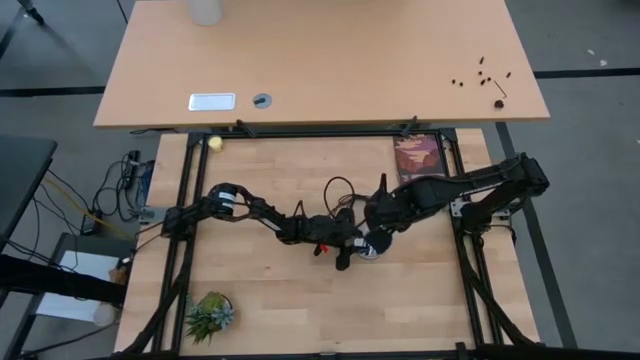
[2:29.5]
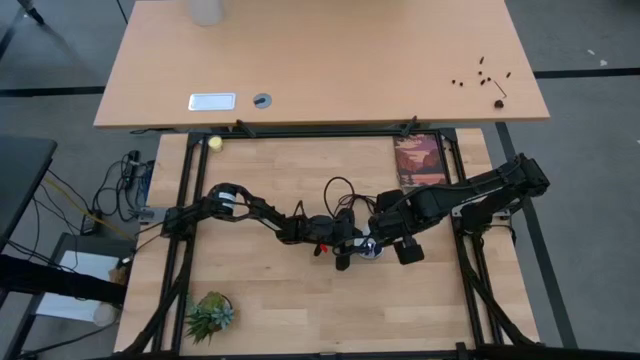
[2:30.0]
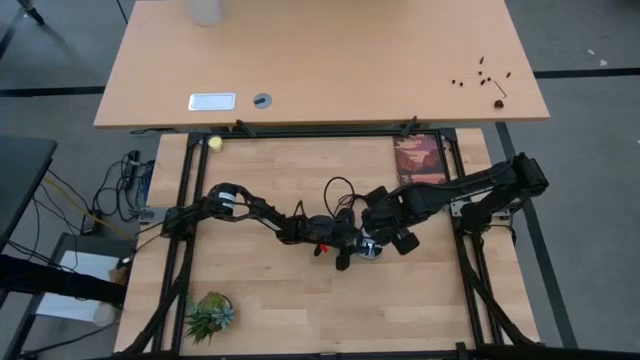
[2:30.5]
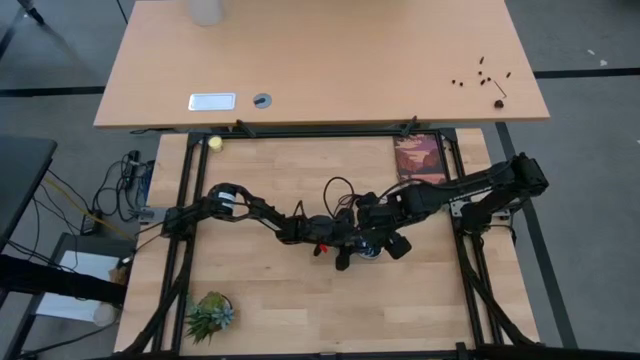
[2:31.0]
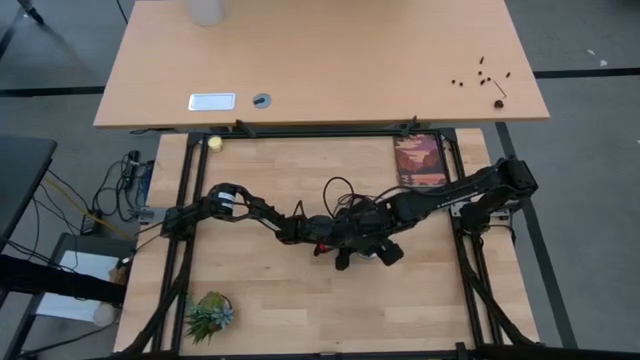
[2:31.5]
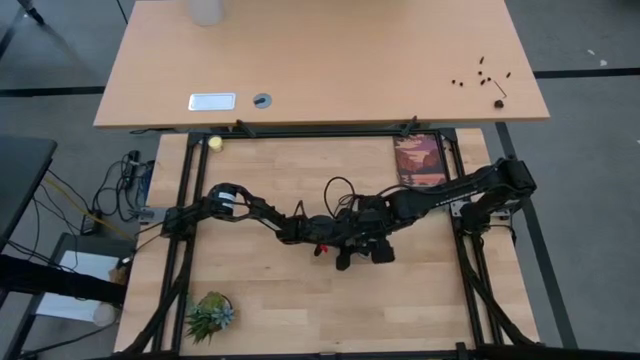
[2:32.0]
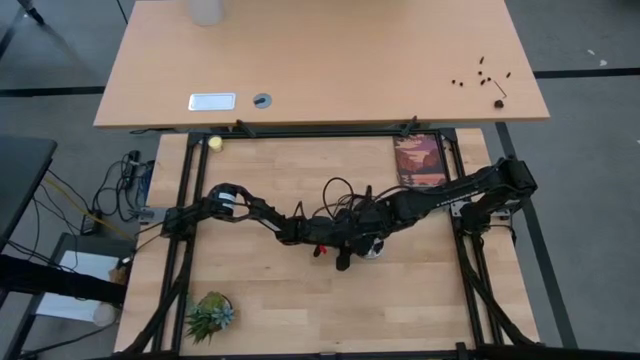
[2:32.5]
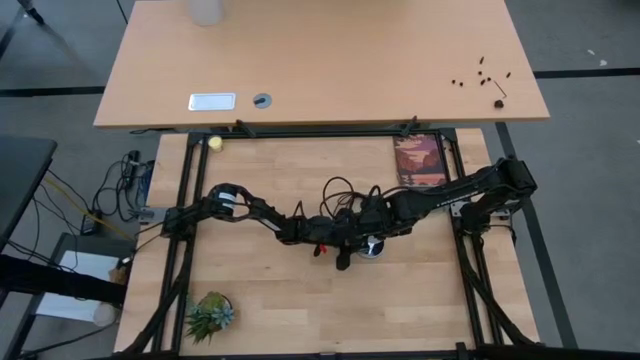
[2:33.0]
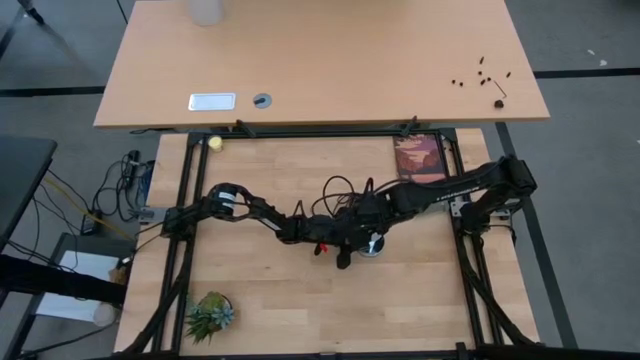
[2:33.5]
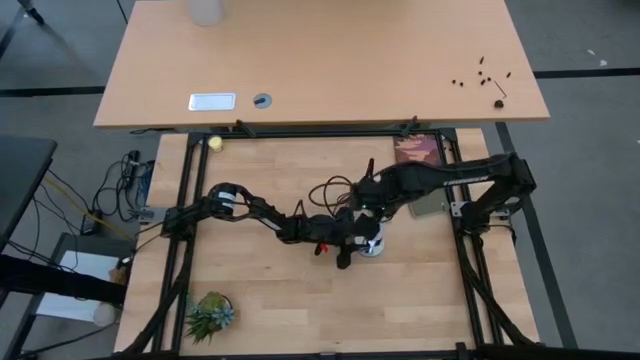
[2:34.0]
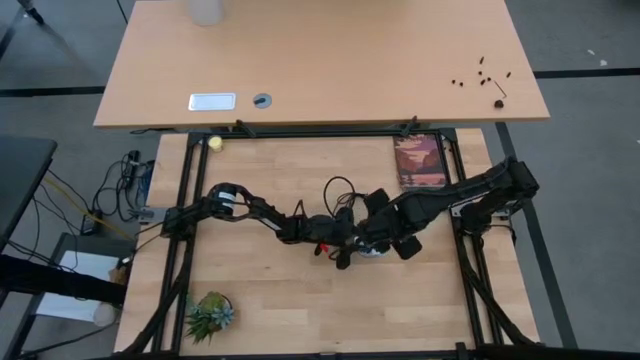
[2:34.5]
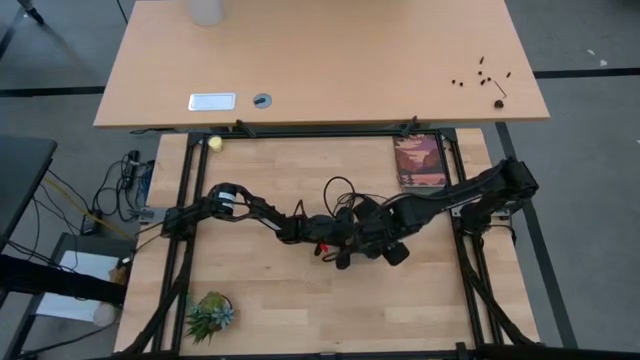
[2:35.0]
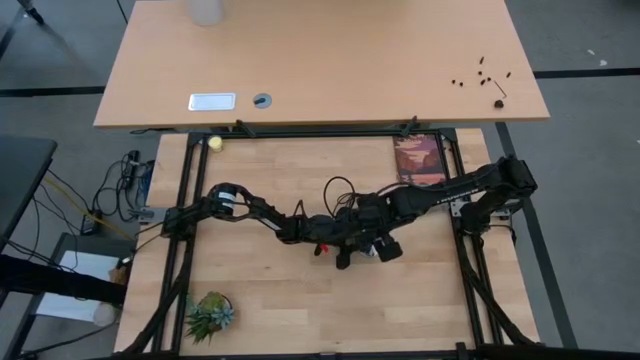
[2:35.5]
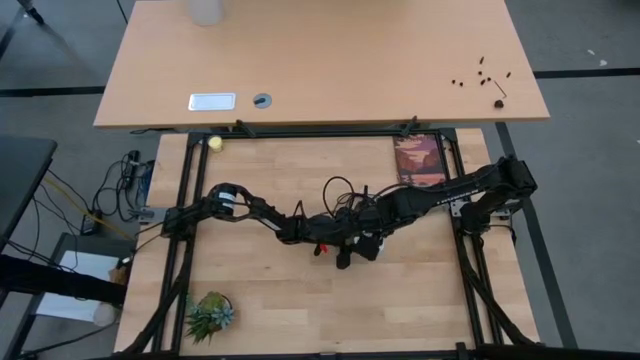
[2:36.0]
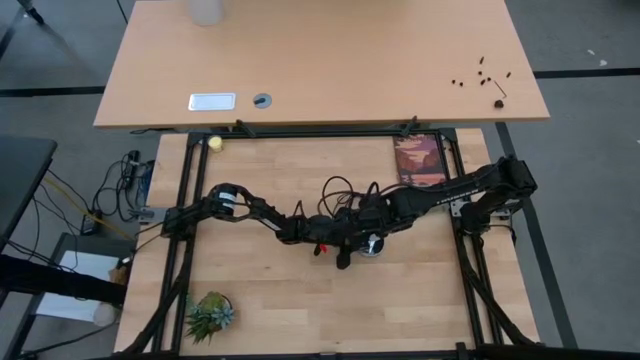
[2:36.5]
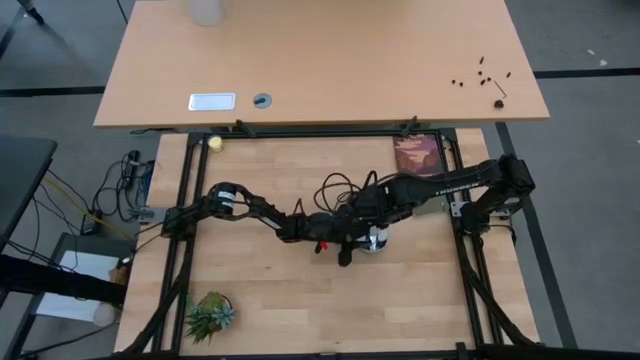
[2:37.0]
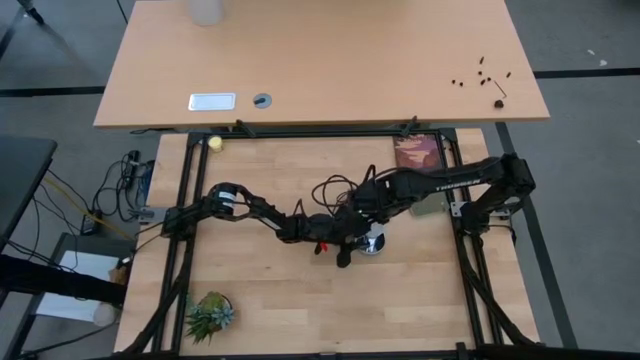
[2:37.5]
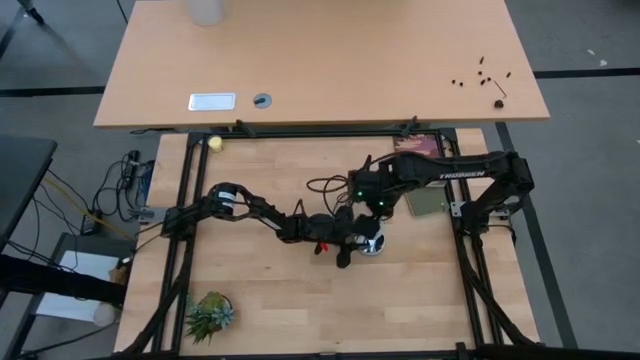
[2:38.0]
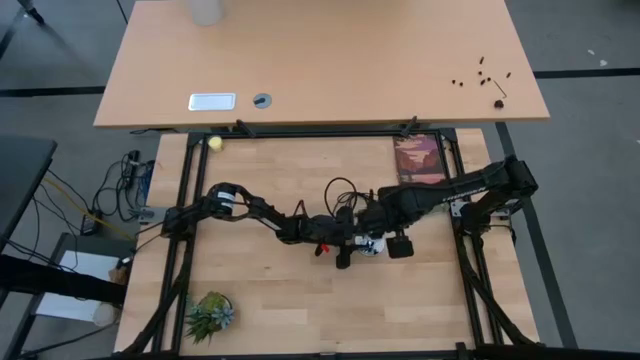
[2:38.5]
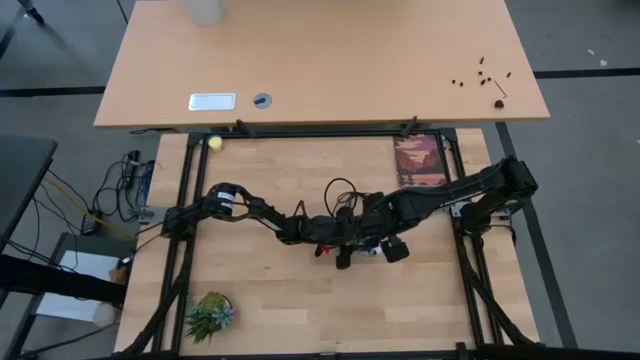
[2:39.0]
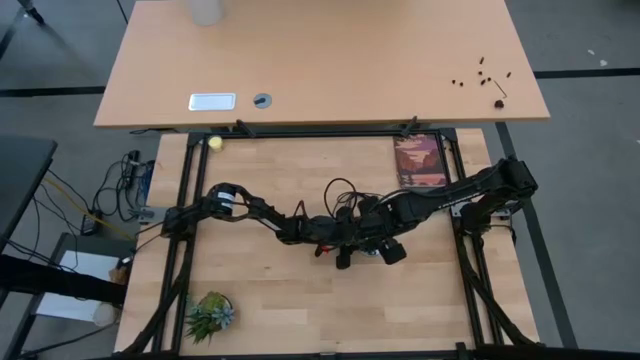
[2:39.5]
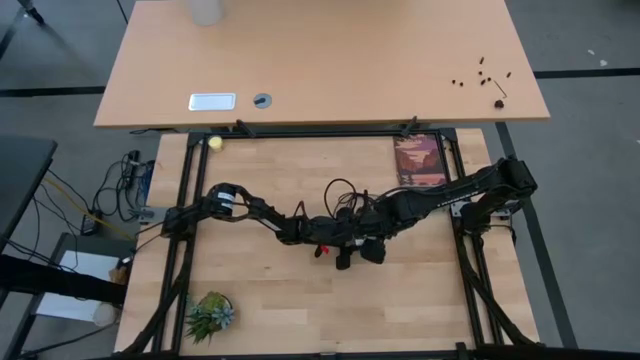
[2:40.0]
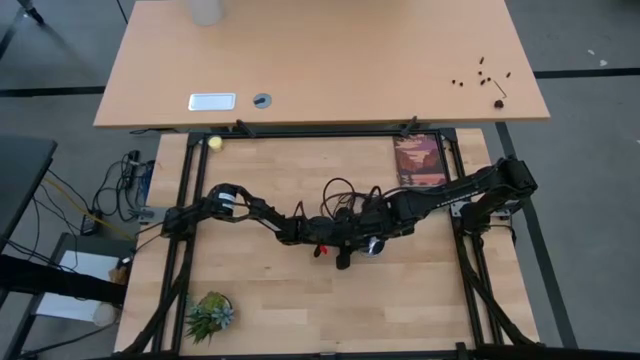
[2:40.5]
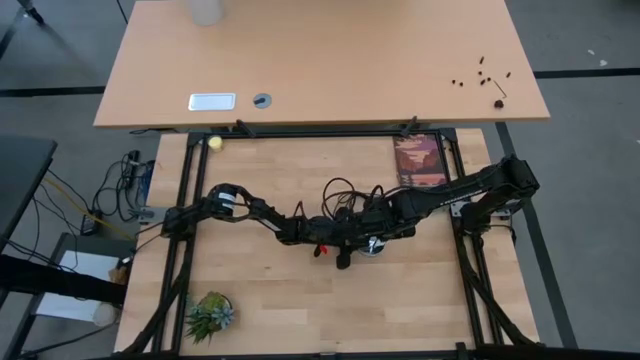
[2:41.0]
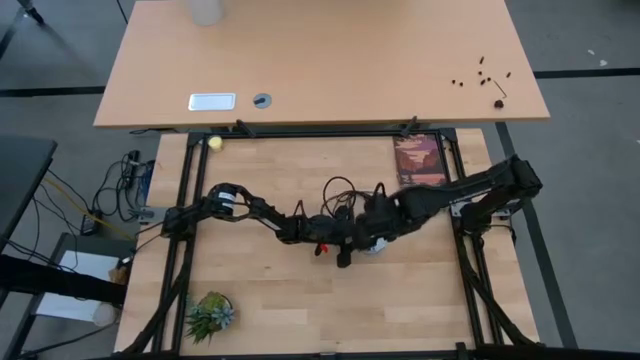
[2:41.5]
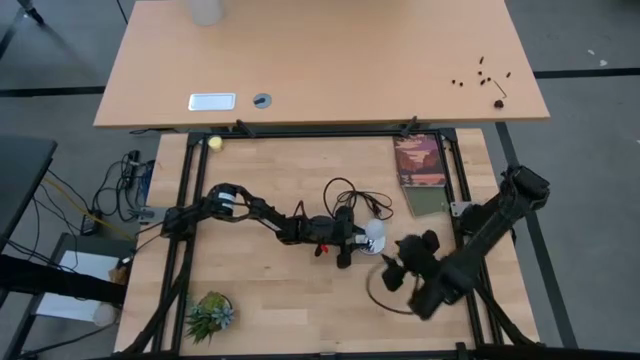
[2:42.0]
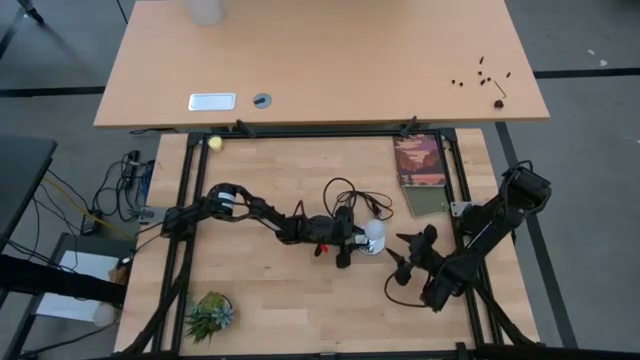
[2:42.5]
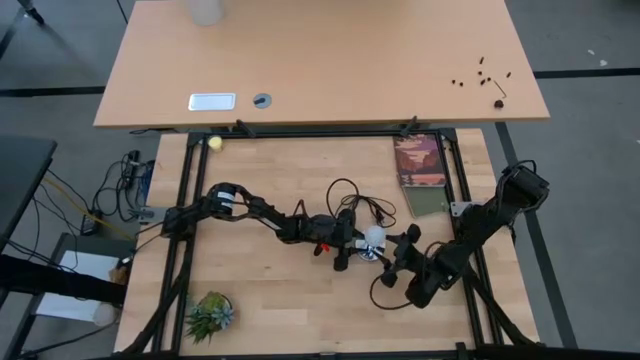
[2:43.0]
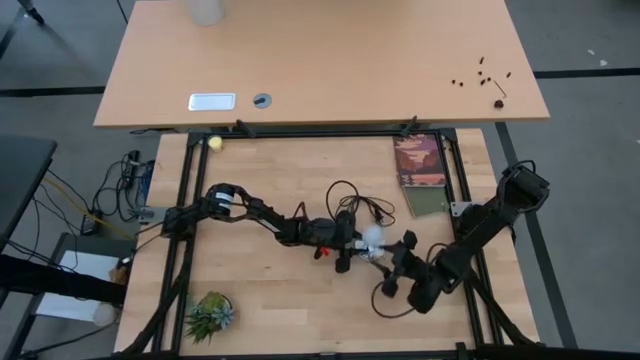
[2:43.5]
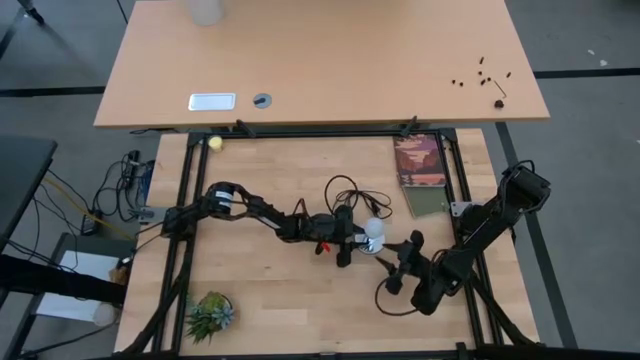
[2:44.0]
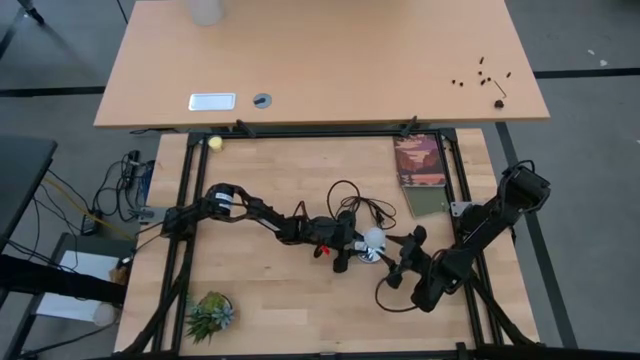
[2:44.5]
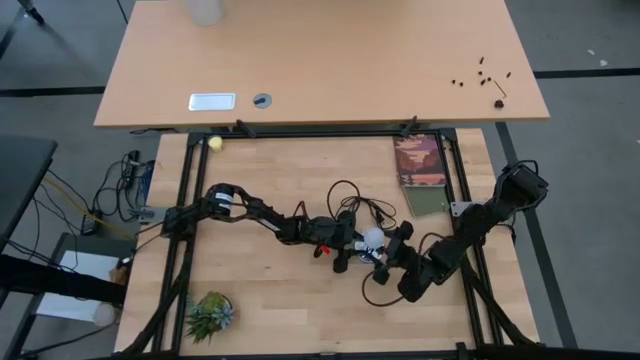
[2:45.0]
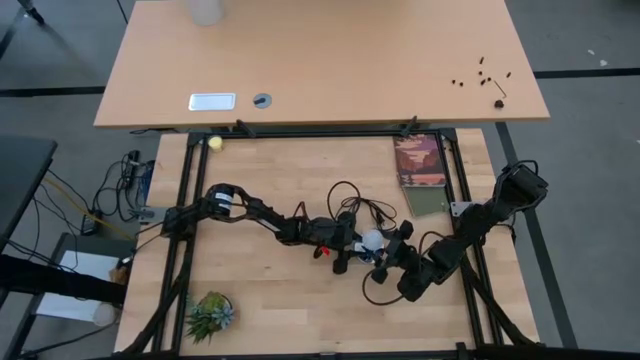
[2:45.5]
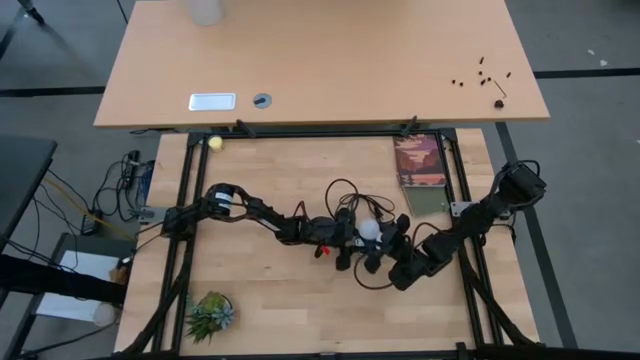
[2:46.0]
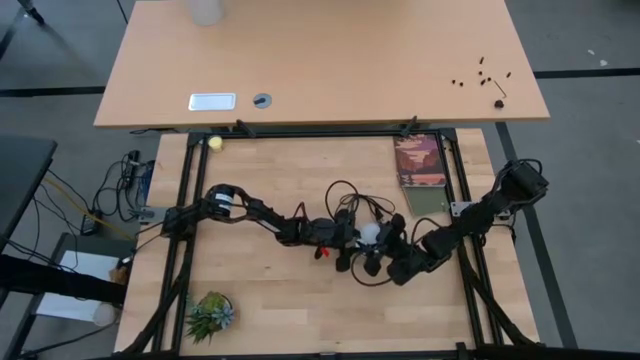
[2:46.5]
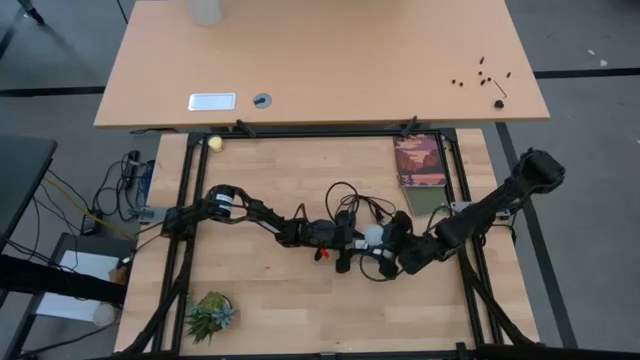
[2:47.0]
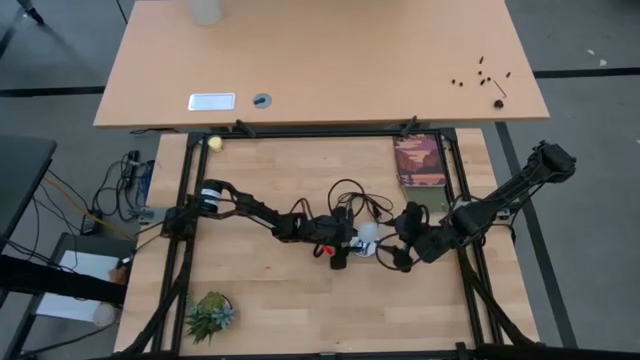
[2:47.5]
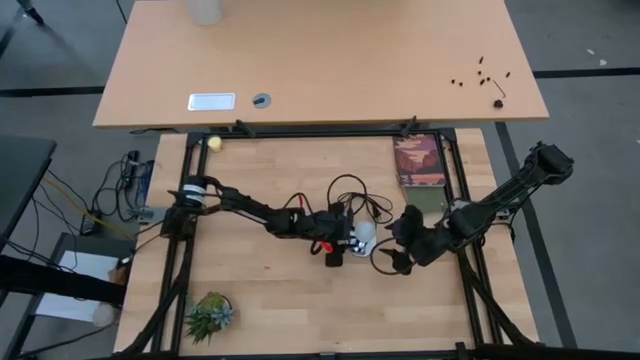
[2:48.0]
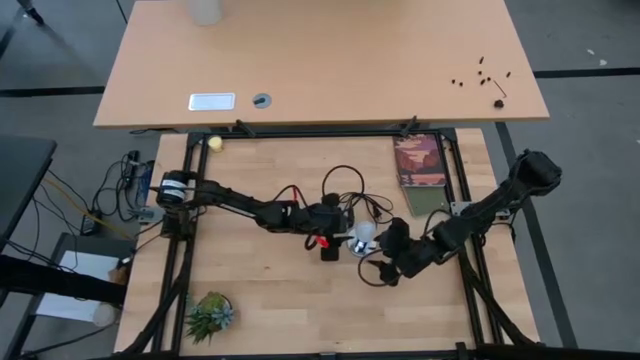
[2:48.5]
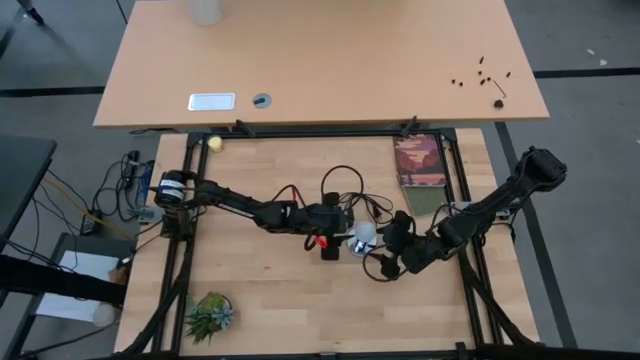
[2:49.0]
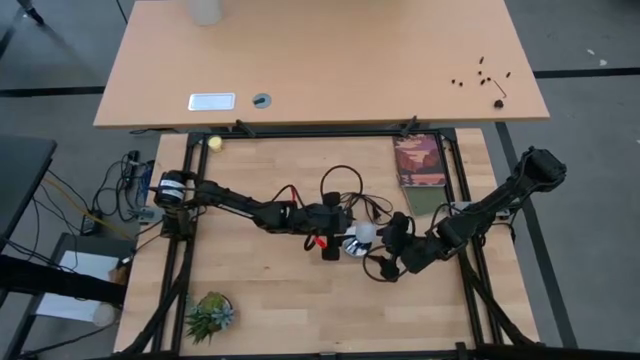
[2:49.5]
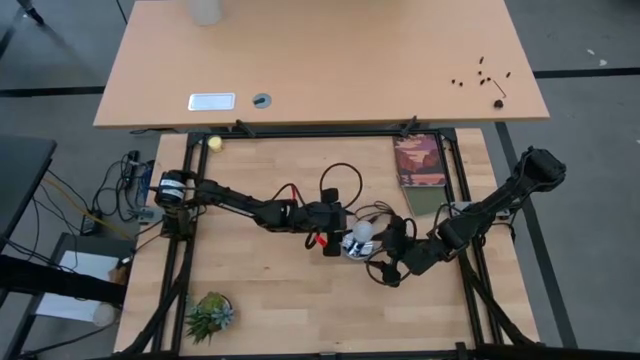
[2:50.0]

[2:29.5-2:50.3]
Task: Screw lightbulb
Insert the lightbulb into the silver lamp

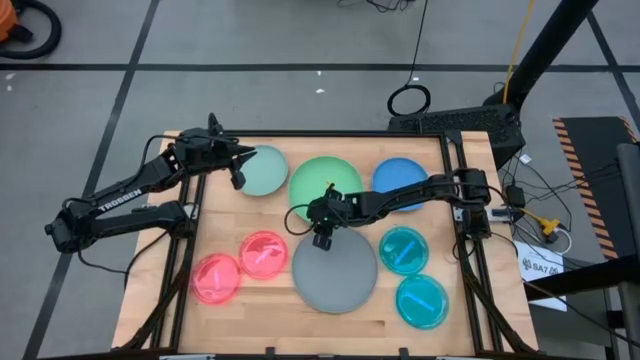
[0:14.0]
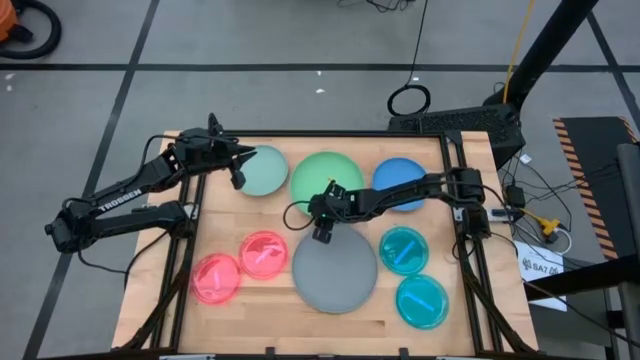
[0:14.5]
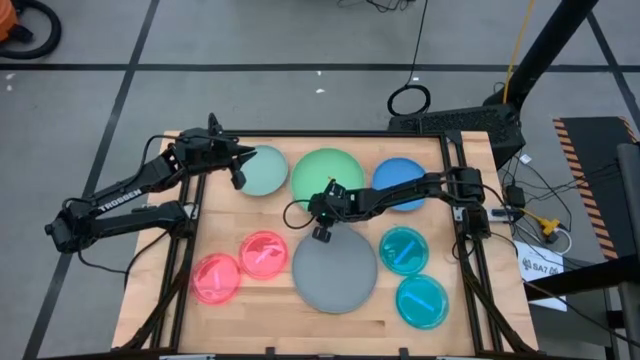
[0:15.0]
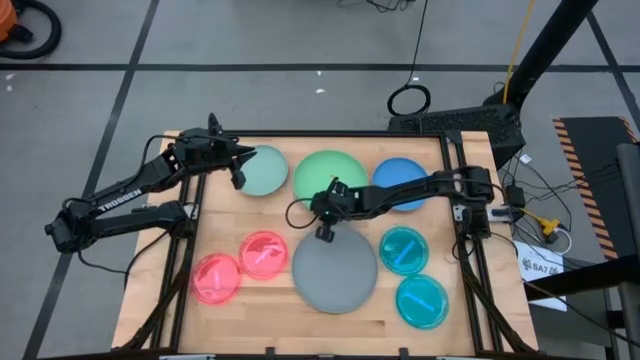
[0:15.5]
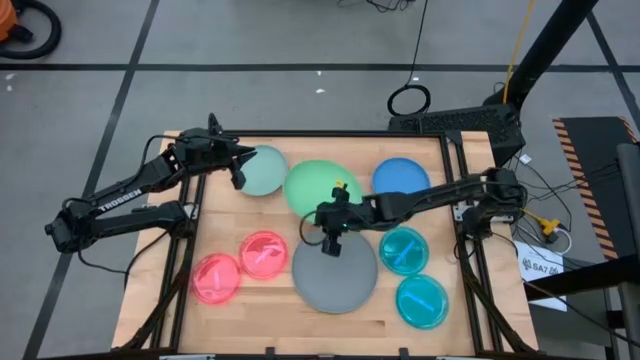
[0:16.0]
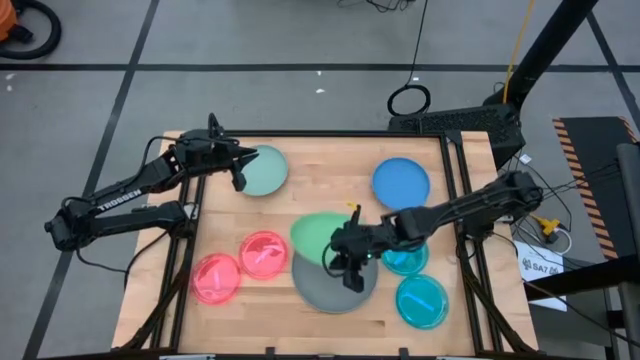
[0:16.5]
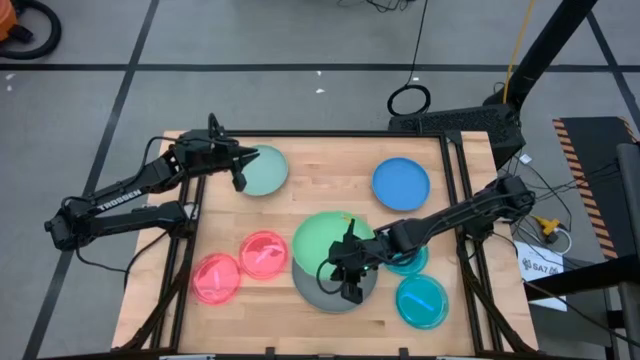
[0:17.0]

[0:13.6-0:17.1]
Task: Stack plastic plates
Stack the green plate on the gray plate
